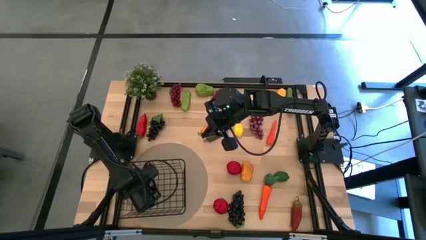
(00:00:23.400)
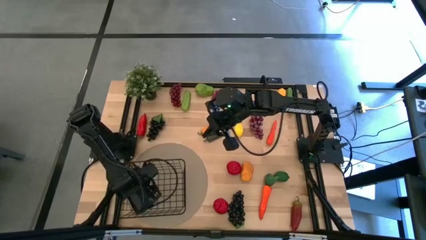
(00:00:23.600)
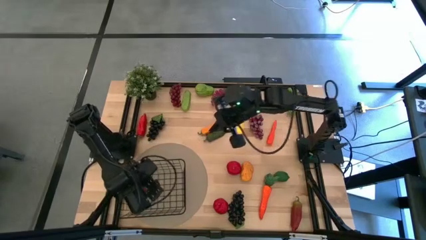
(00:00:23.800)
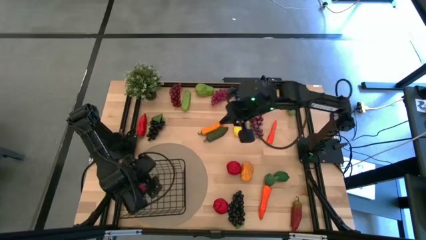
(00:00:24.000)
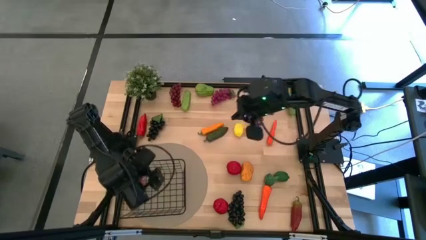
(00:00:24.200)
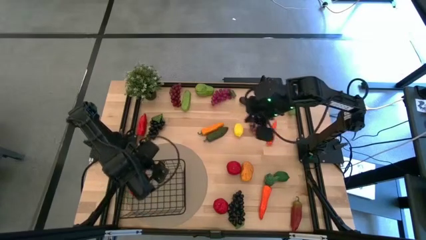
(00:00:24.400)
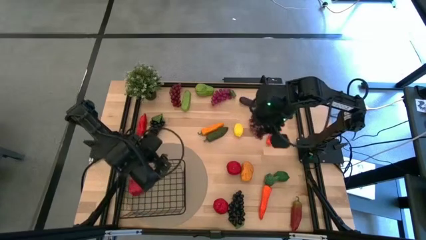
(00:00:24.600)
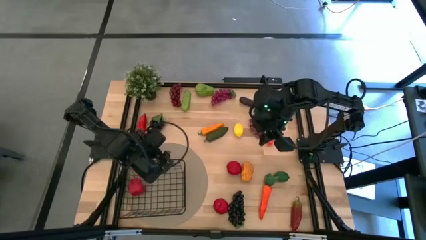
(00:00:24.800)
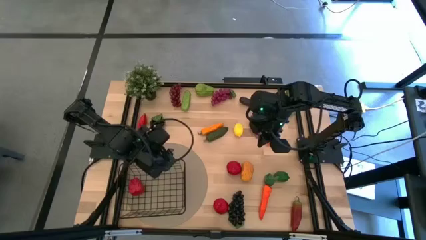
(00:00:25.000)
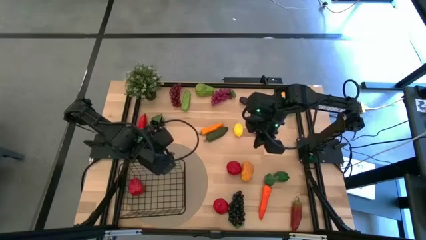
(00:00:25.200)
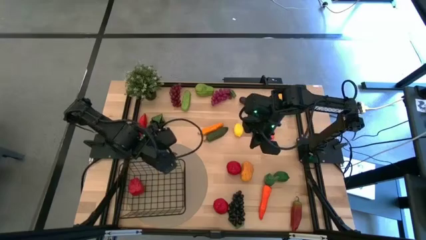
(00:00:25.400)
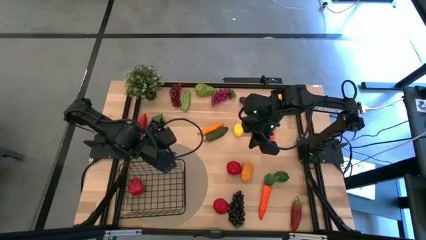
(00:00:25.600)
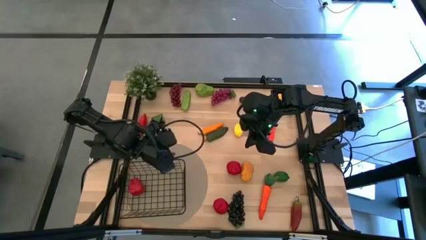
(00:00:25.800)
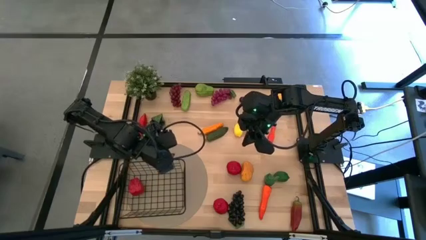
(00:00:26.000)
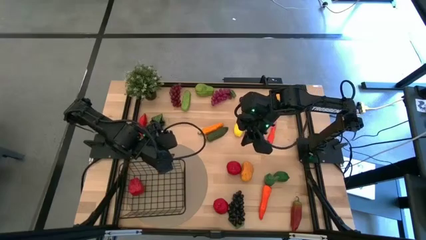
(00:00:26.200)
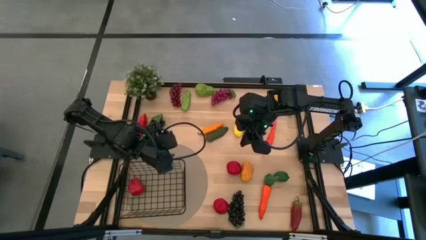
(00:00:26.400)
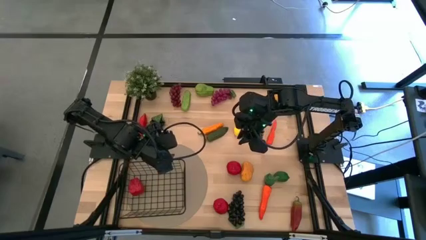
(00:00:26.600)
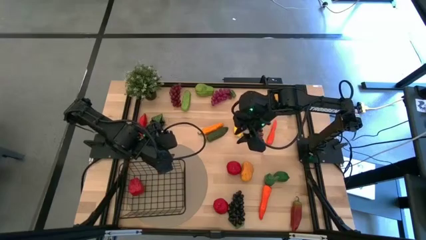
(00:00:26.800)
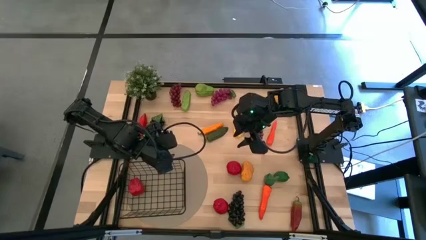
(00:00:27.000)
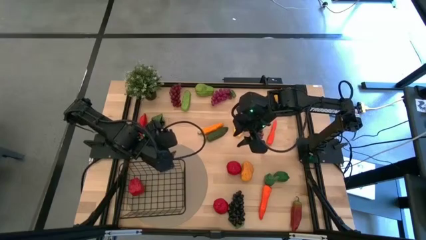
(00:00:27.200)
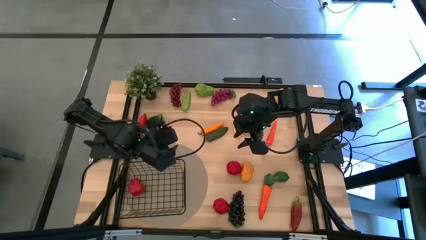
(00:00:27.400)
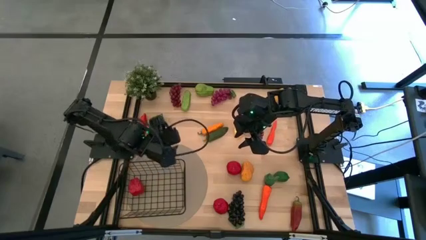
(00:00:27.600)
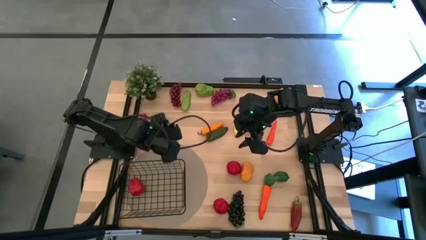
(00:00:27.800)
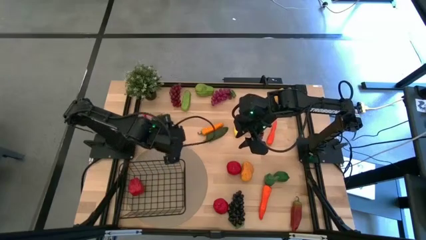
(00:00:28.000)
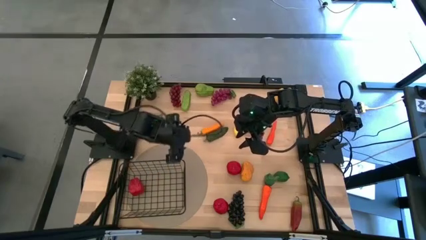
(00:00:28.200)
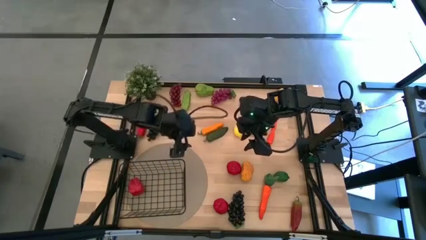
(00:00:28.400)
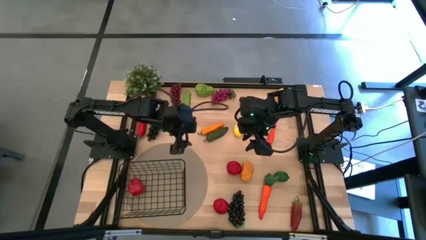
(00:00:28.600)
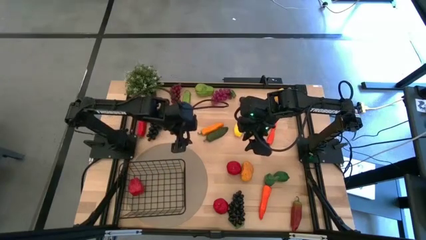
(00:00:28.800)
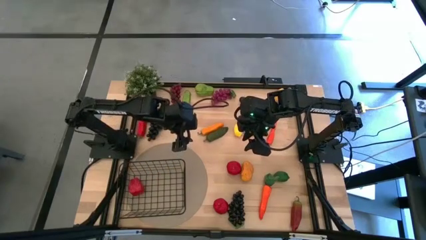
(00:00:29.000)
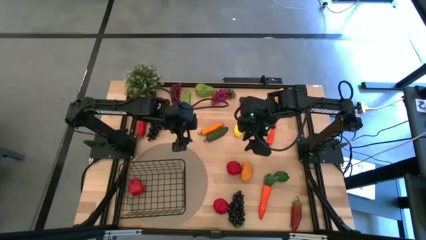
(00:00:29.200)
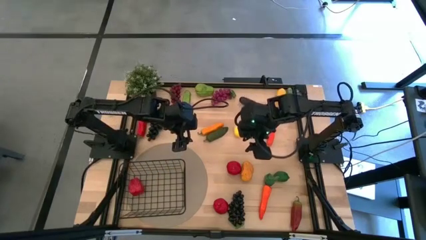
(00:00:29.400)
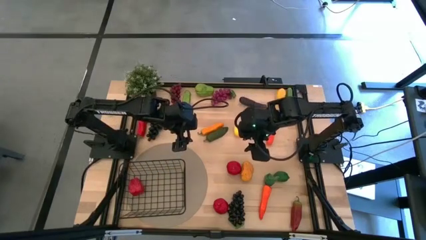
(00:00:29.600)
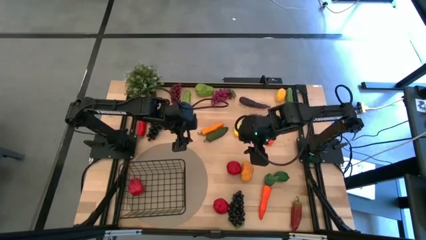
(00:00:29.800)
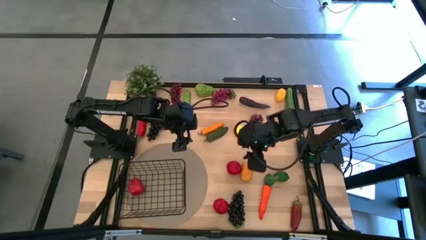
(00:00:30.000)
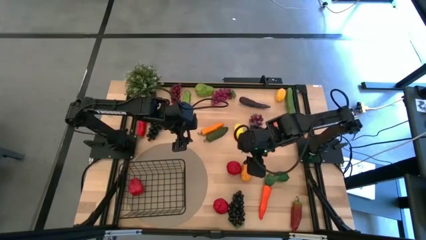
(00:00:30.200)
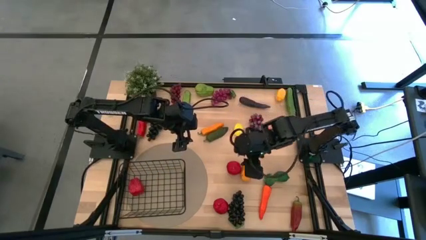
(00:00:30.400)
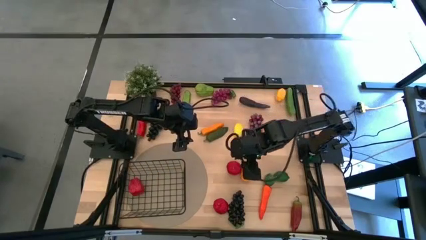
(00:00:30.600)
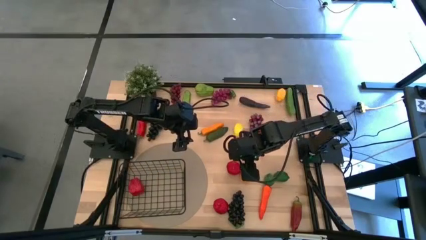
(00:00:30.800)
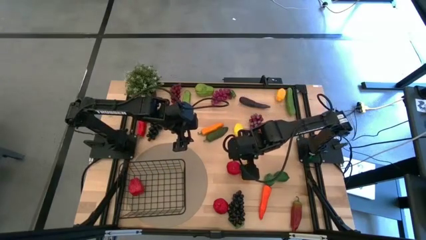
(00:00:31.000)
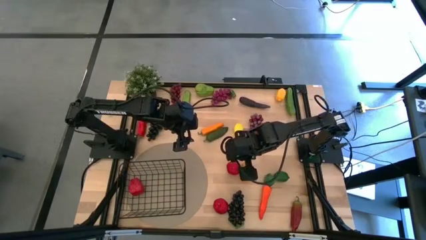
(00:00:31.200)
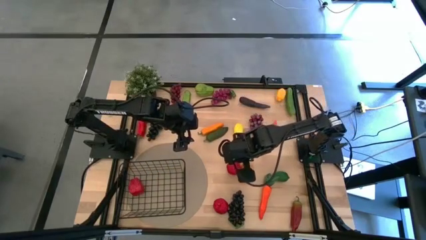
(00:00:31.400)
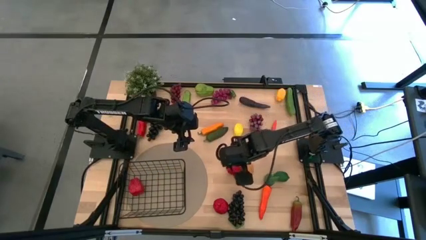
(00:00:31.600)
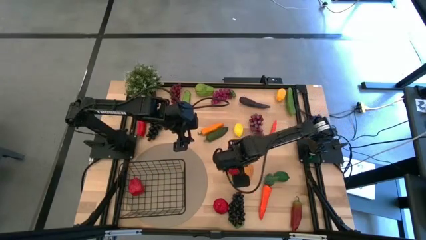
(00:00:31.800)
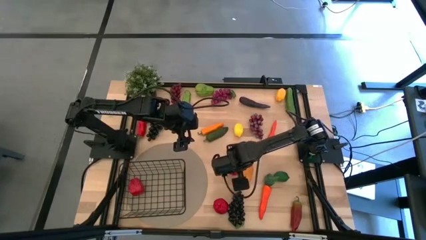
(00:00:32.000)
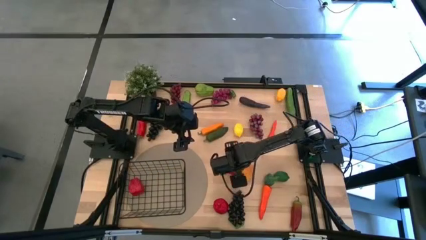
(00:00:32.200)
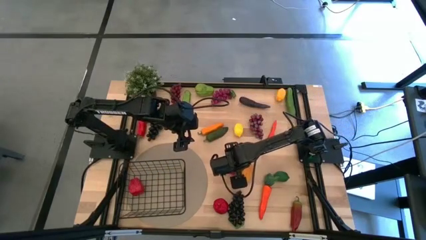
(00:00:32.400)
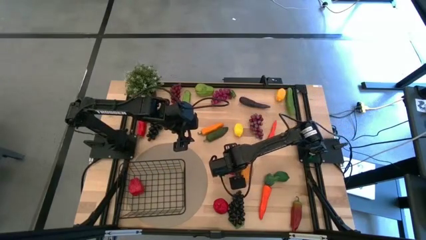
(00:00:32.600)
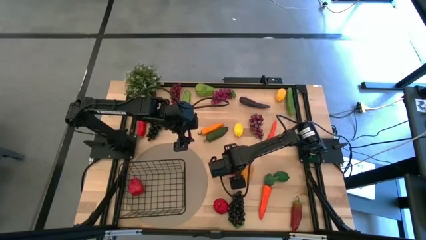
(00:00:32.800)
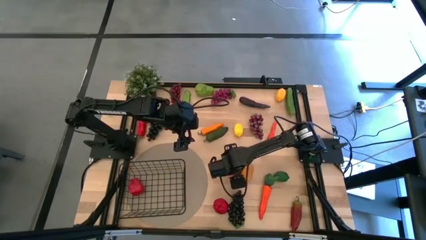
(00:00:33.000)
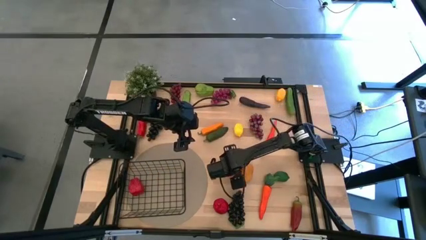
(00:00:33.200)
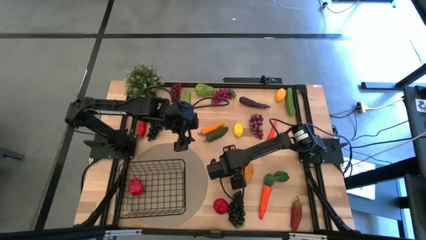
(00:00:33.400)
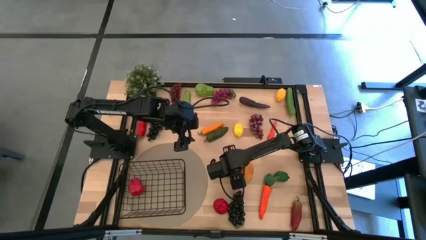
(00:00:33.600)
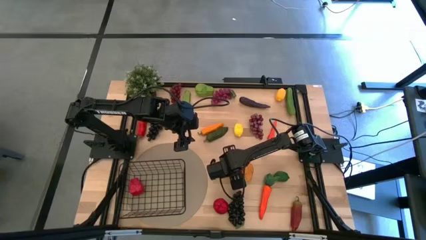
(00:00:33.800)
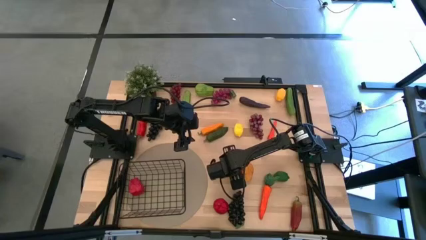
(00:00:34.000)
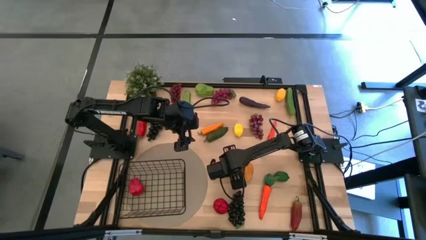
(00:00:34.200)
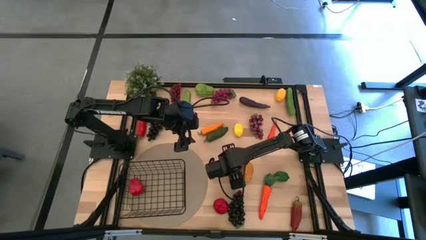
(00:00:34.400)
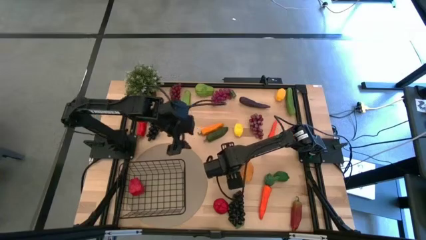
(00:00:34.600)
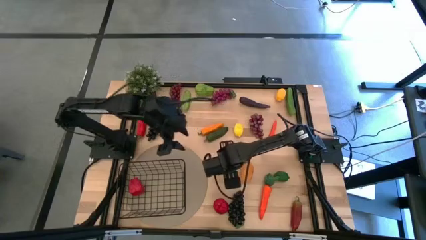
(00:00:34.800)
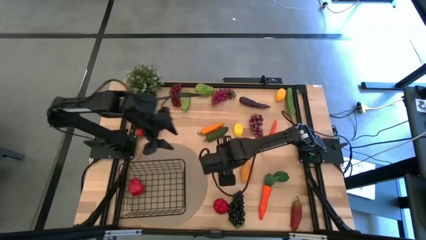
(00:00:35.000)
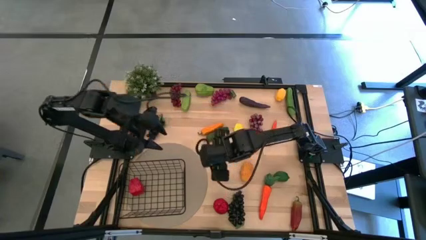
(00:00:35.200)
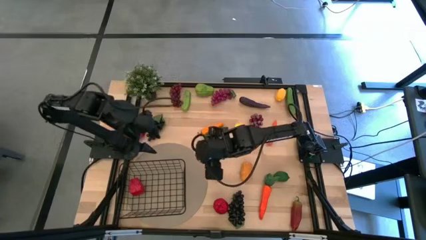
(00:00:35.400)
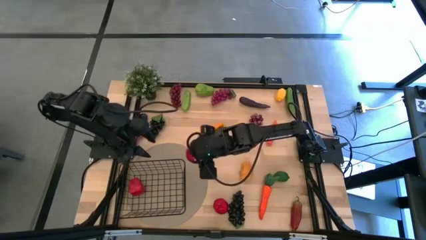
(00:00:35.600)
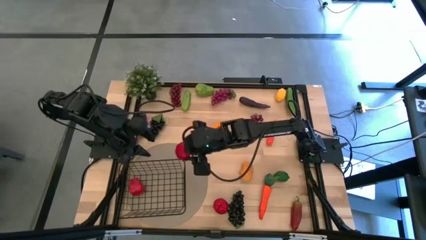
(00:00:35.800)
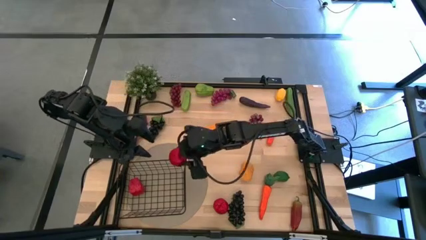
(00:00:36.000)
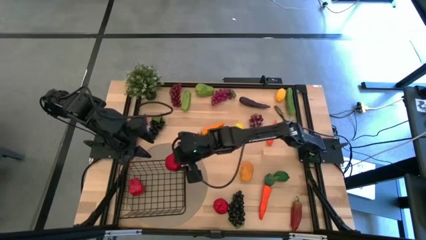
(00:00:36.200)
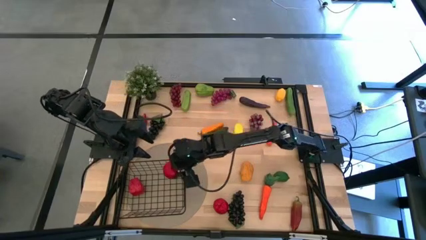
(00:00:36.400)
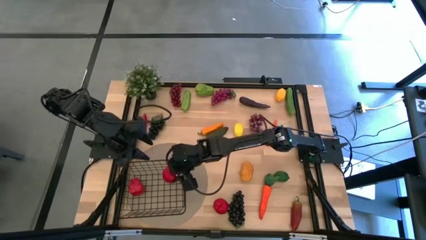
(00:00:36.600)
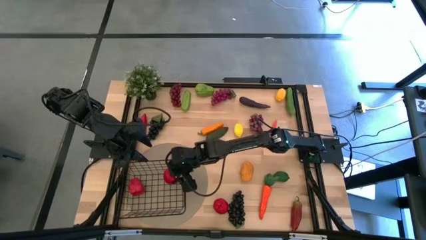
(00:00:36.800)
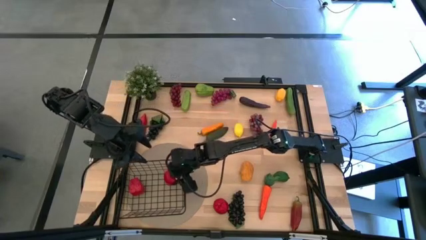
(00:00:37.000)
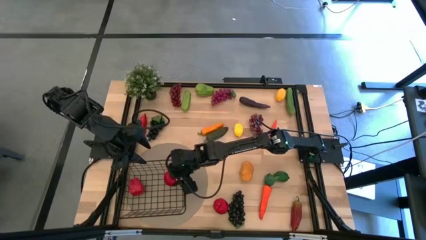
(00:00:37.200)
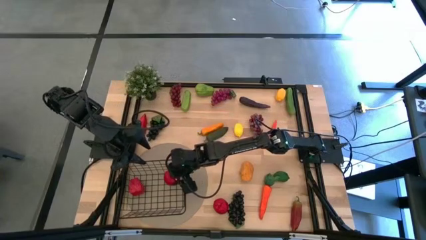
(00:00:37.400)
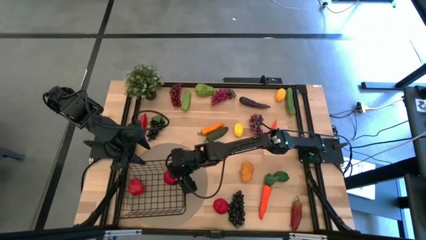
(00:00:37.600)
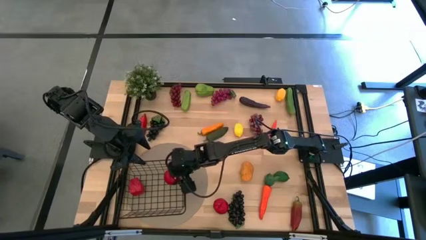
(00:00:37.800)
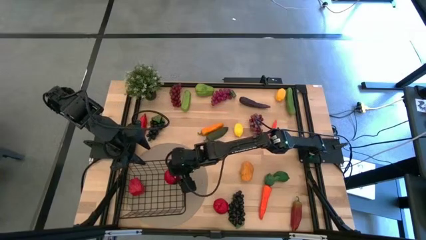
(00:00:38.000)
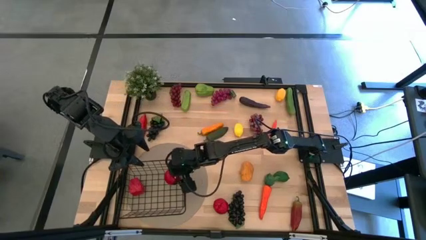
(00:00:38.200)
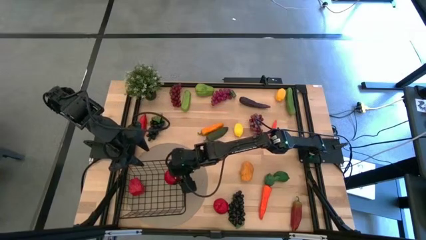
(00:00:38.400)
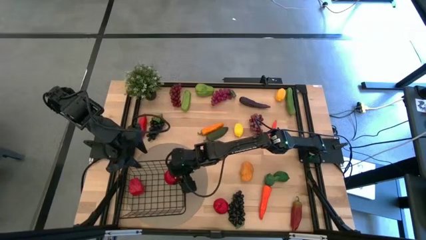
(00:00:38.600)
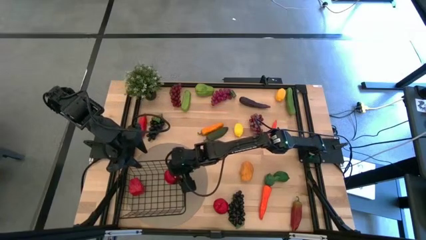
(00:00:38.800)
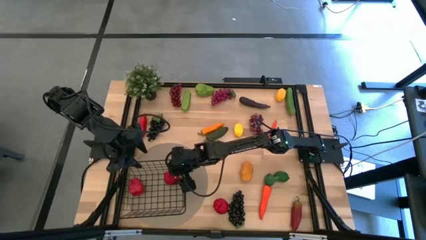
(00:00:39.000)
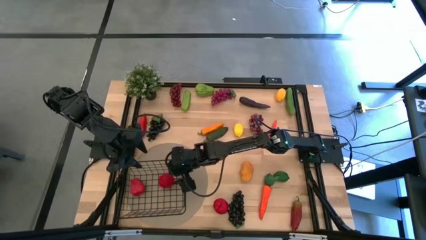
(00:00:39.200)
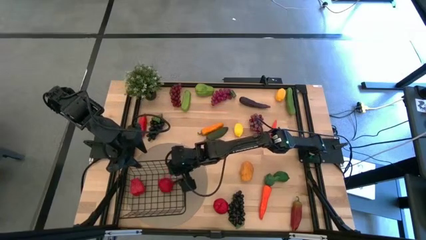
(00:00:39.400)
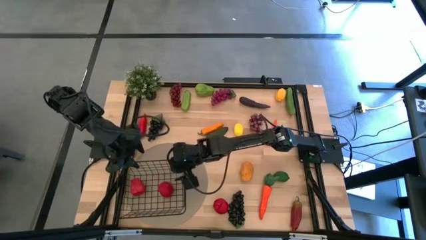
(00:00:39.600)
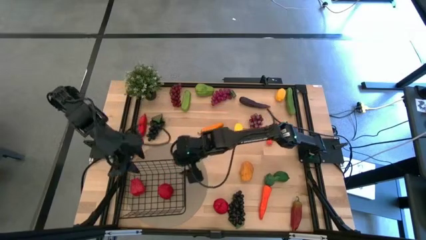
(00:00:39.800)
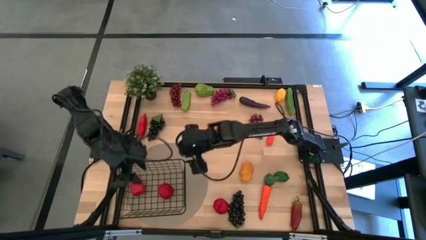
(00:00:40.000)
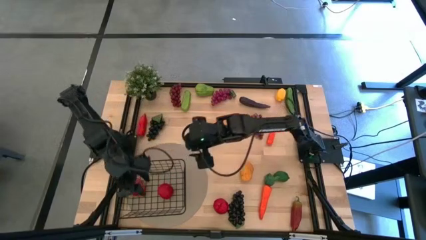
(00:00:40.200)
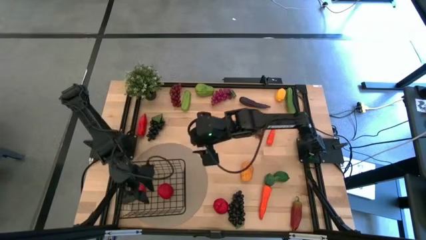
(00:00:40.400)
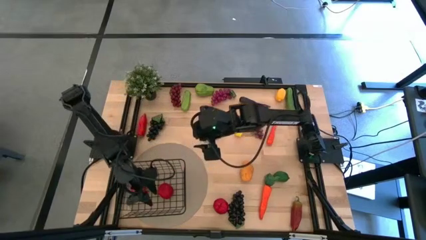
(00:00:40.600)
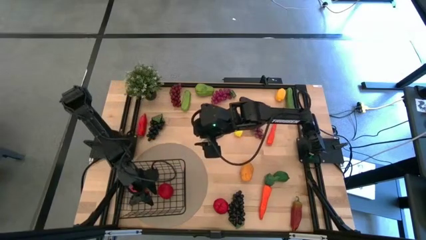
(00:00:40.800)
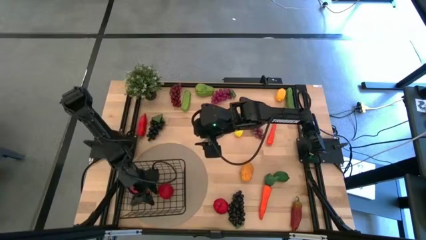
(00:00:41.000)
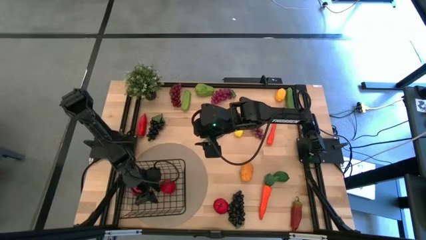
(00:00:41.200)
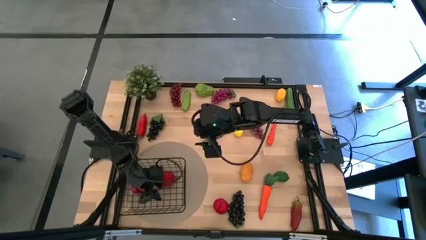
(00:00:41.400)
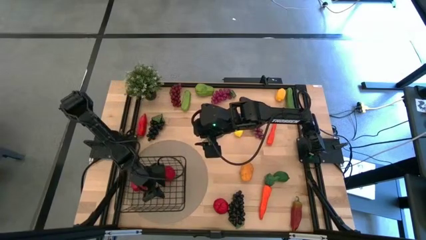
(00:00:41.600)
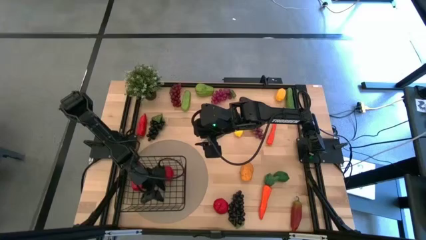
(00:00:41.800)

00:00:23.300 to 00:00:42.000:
Task: Build produce basket
Put the top red tomato into the black wire basket
